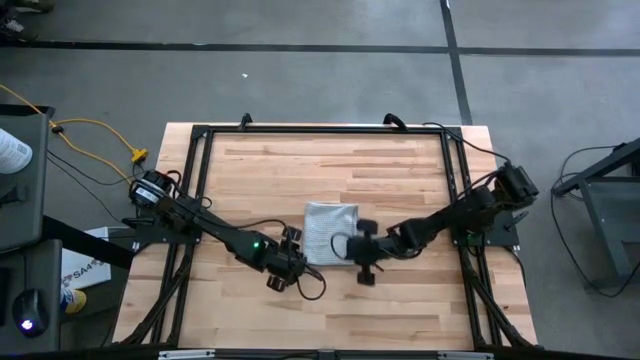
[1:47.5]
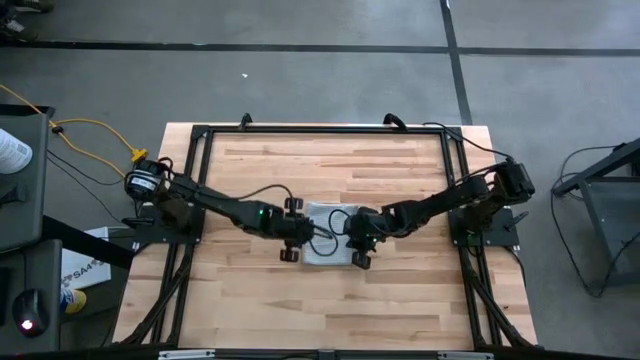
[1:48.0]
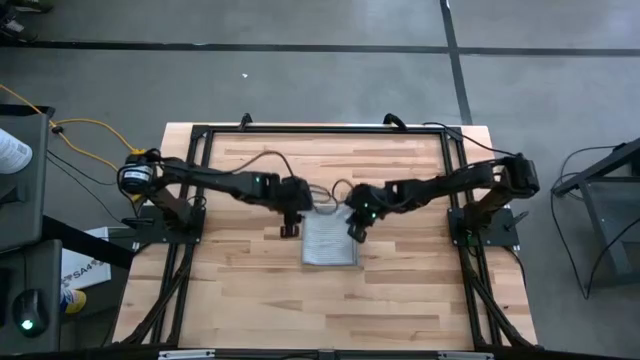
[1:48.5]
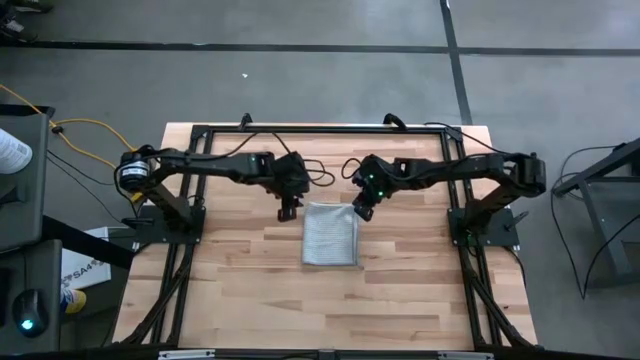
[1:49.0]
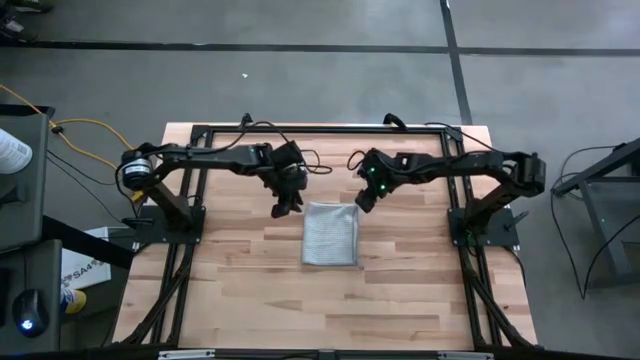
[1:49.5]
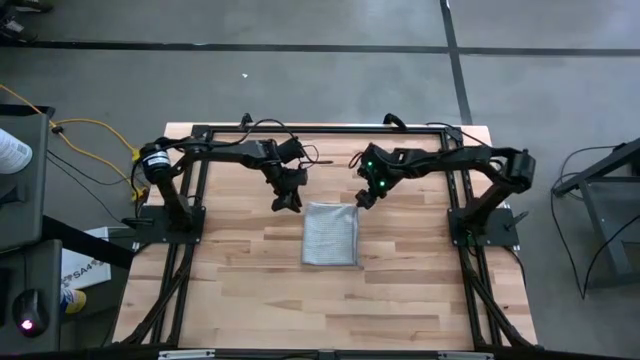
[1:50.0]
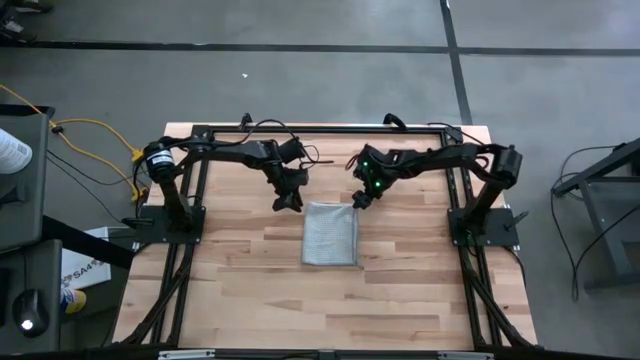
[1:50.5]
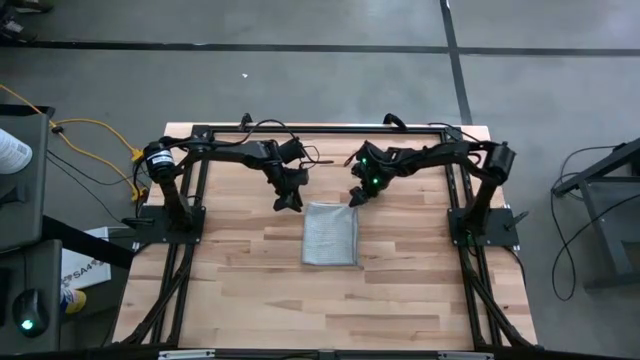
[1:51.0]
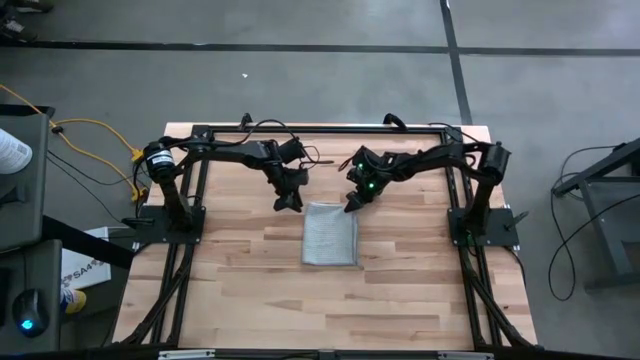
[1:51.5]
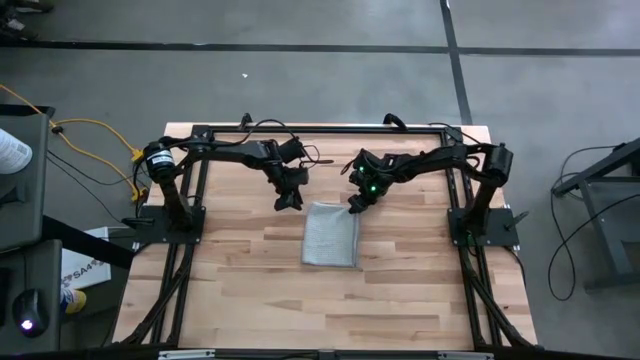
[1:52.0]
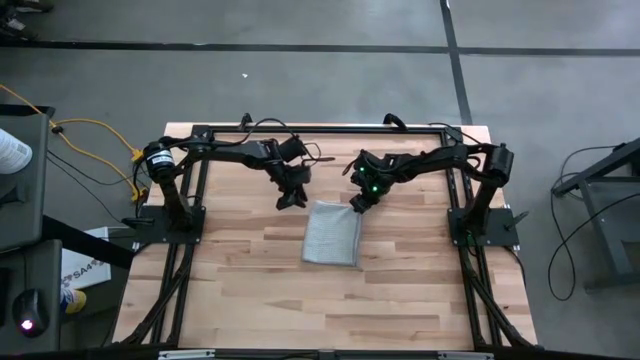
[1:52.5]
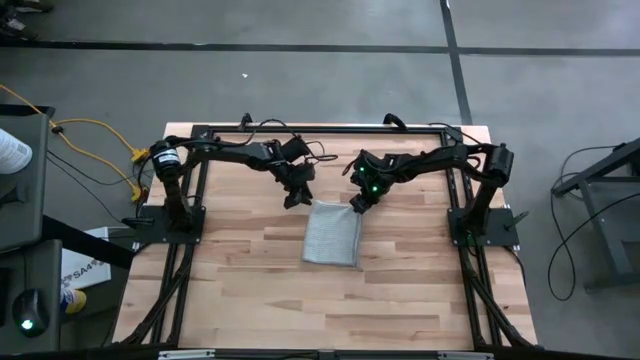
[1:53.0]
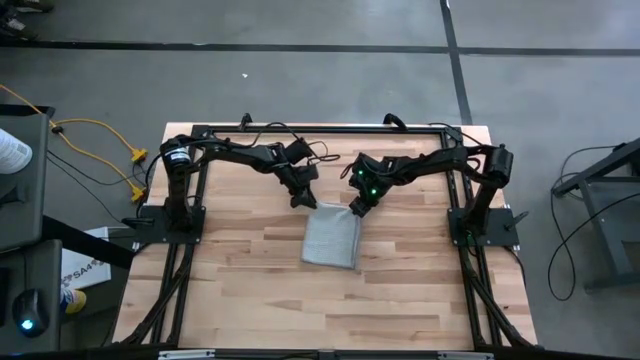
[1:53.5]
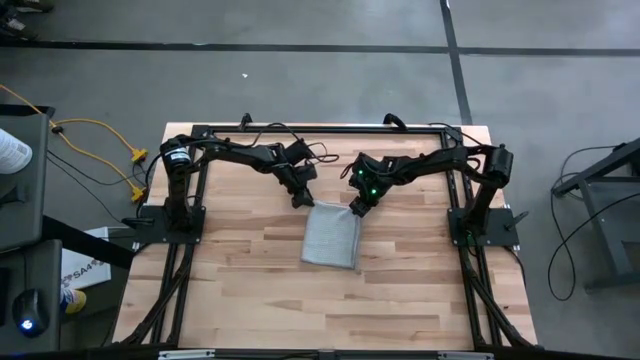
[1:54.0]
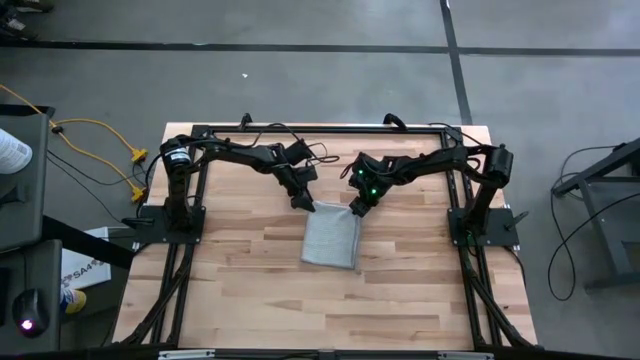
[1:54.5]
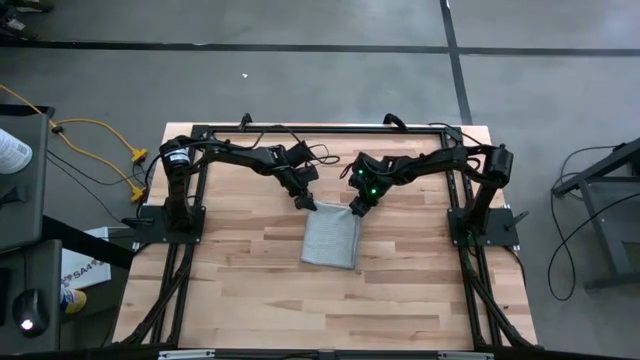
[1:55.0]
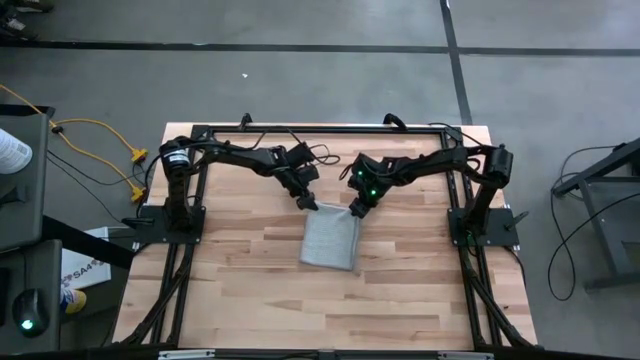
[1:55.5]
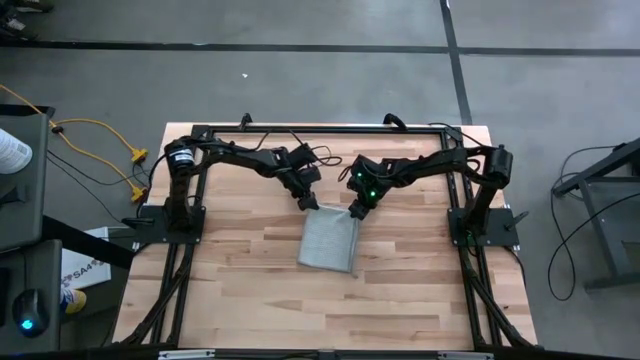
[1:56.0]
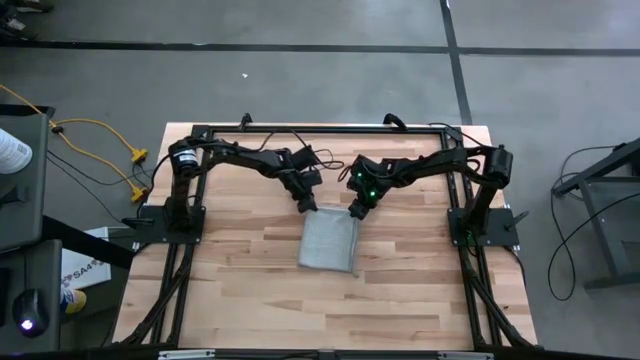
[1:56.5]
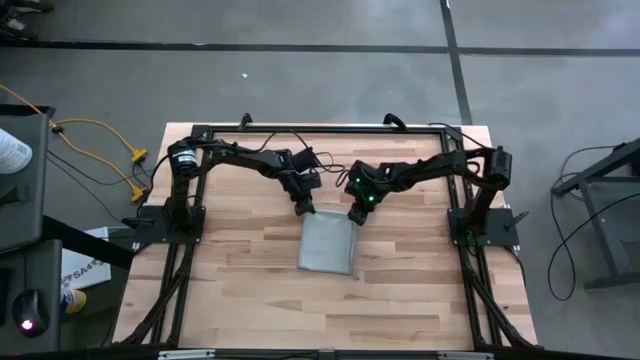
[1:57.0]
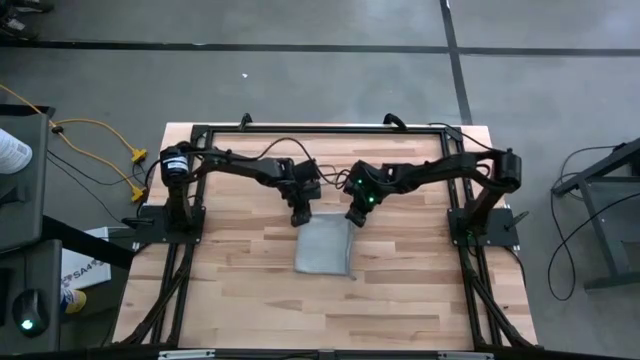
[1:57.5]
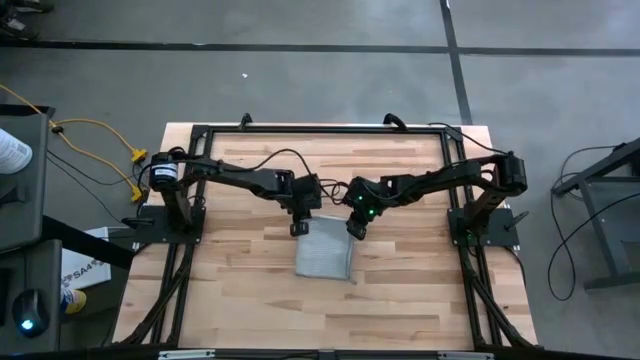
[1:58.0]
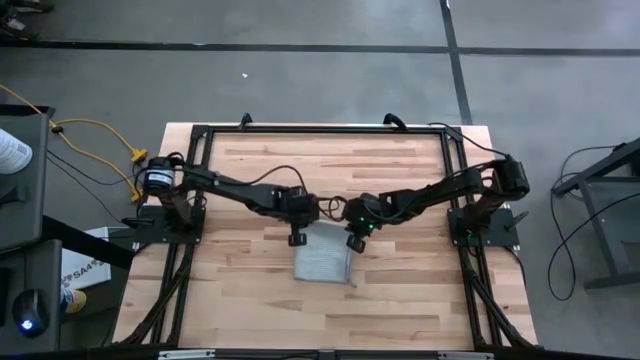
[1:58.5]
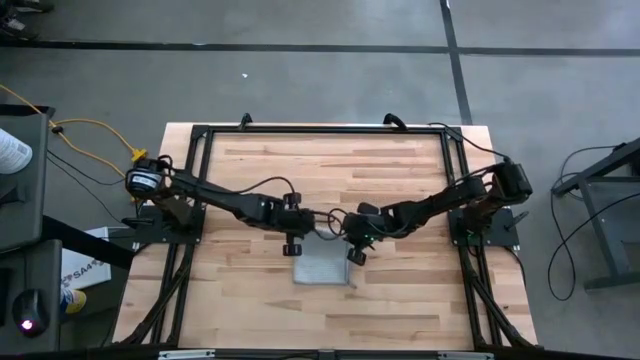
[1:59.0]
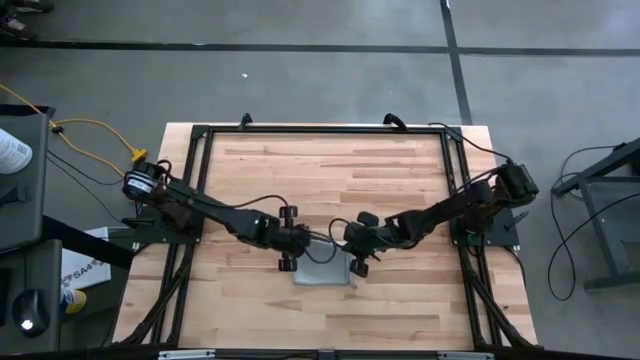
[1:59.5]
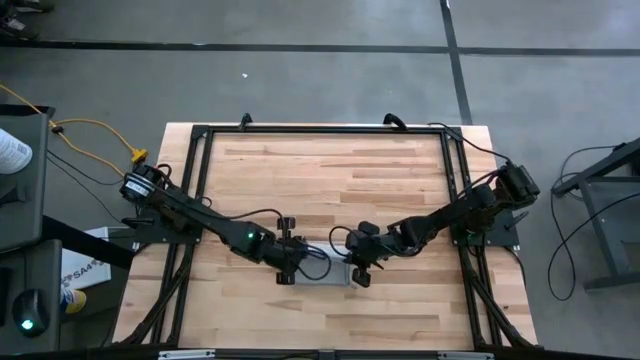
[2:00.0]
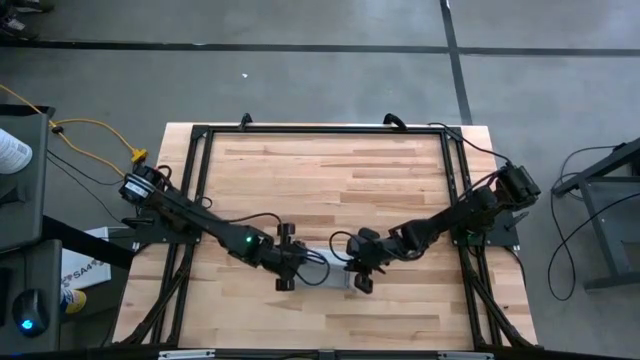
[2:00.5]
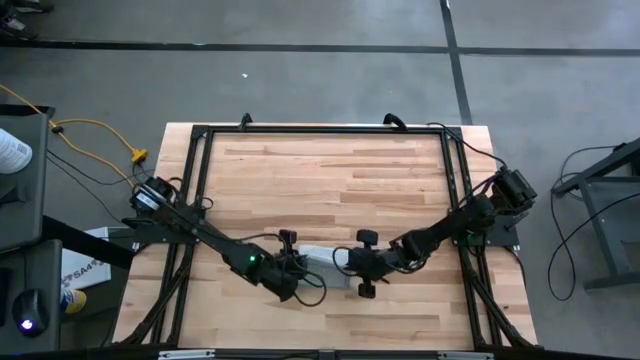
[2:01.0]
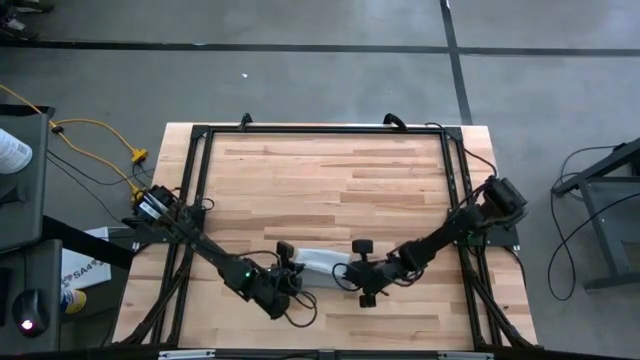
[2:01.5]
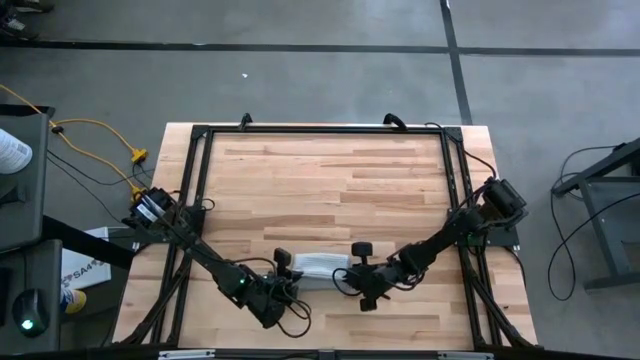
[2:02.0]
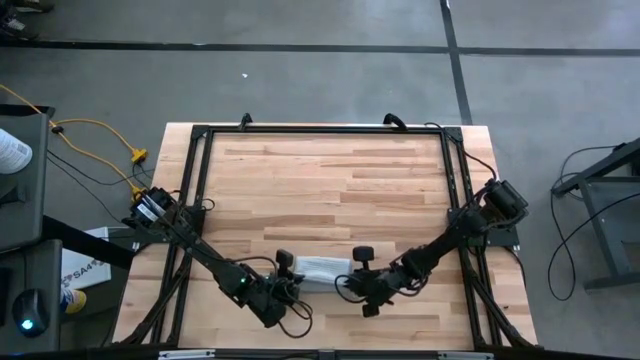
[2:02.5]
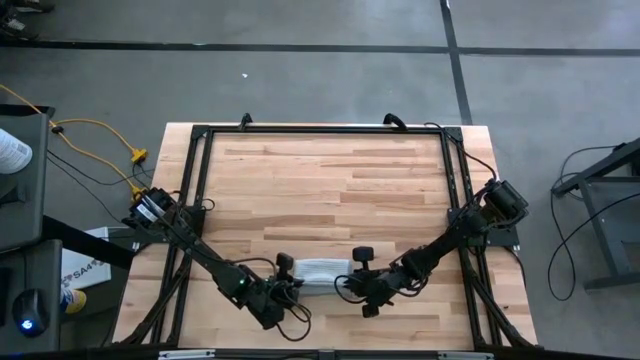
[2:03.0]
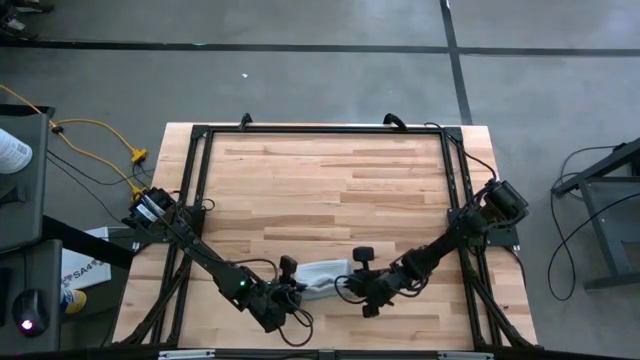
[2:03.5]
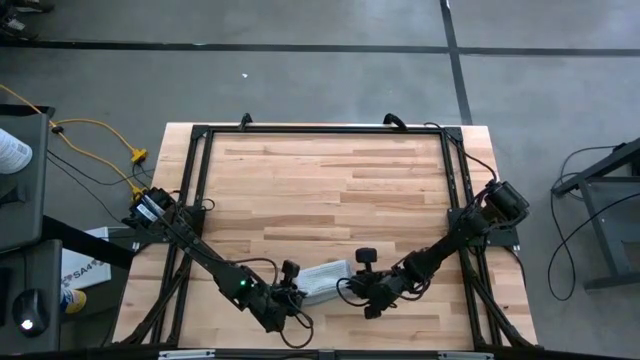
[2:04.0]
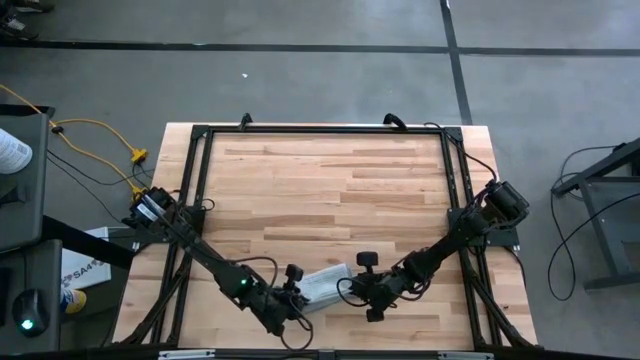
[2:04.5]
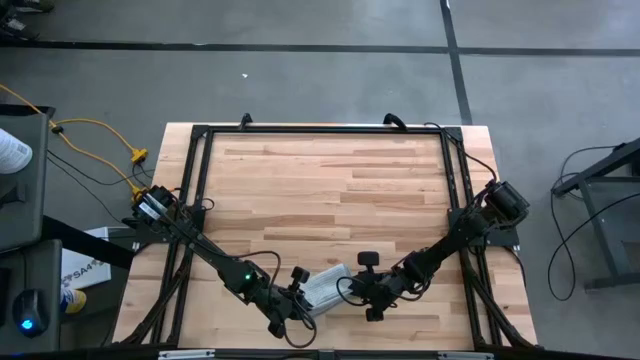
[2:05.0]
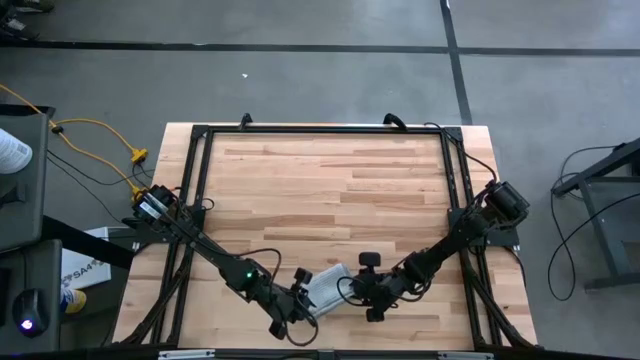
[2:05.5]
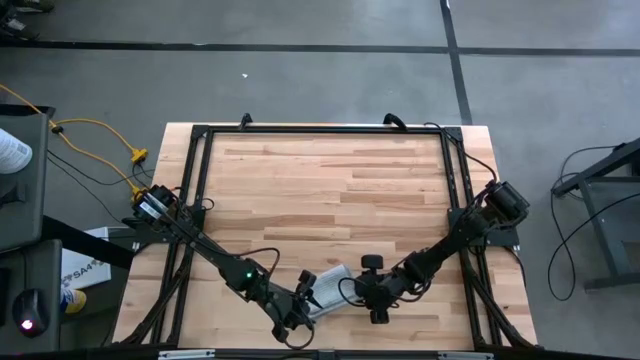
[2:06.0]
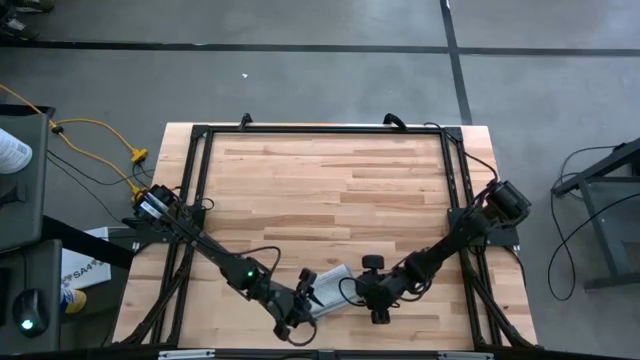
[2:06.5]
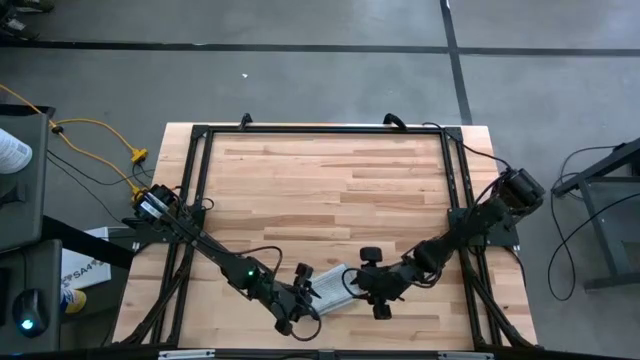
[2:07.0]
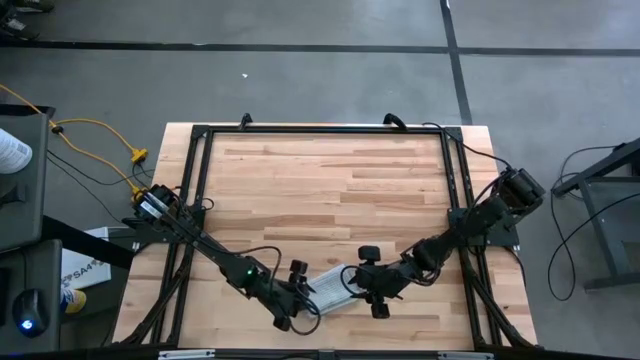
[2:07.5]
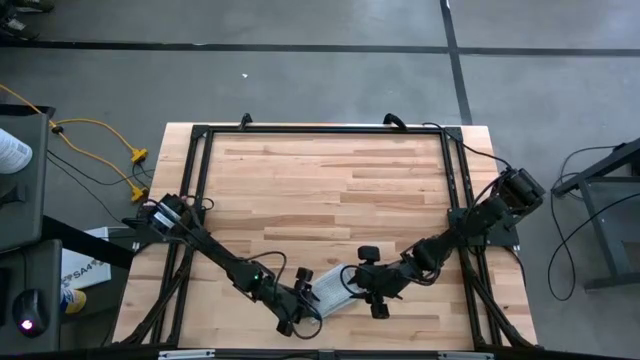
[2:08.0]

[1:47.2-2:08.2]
Task: Fold microfiber towels
Fold the gray towel
